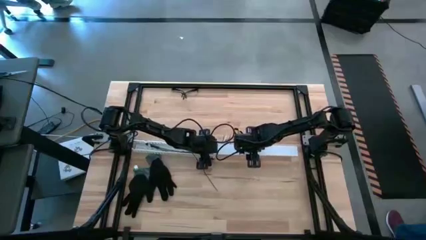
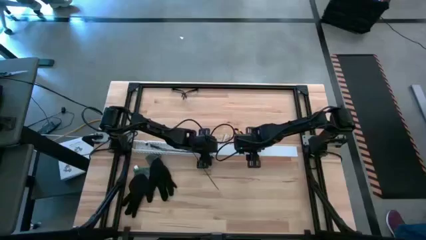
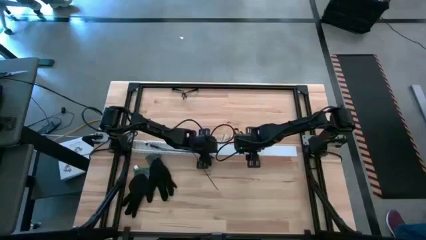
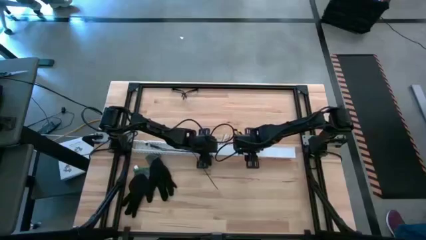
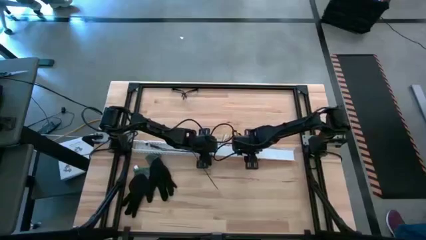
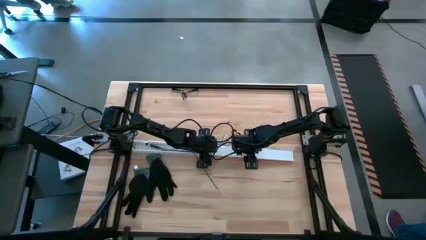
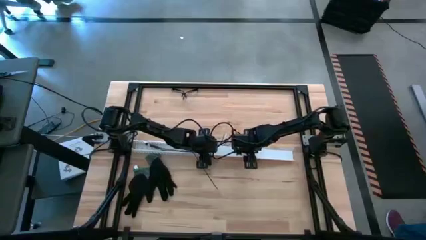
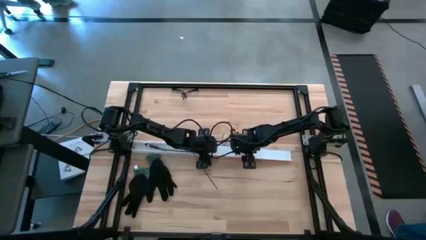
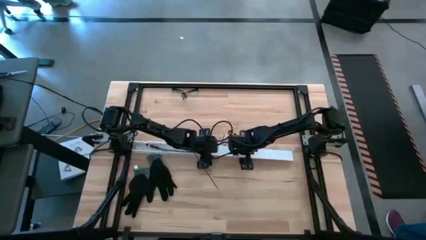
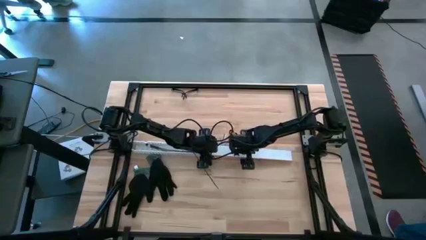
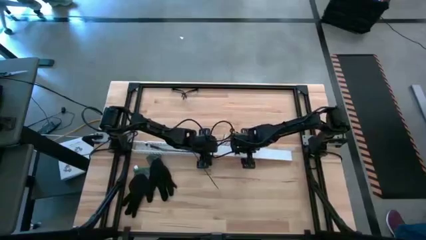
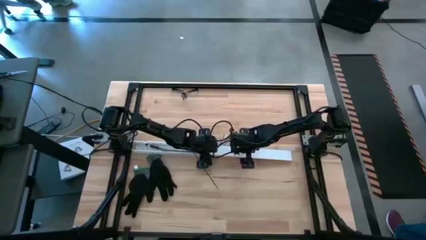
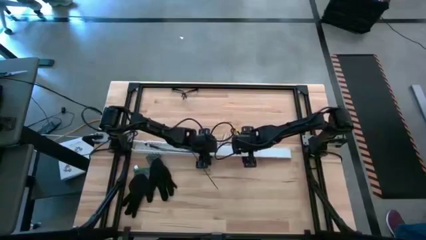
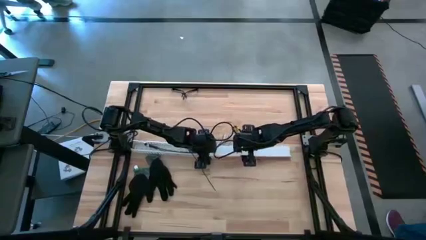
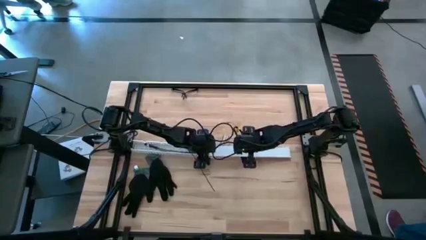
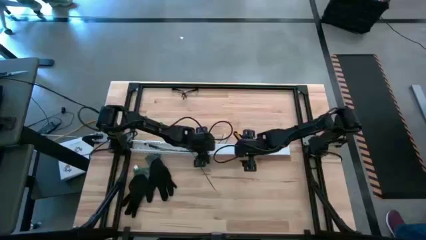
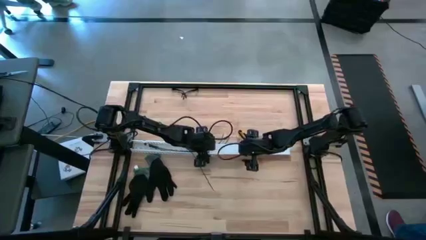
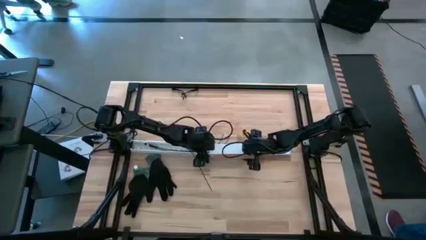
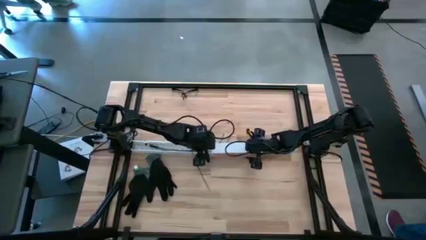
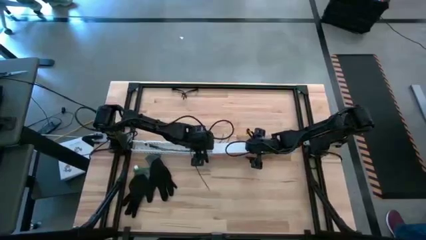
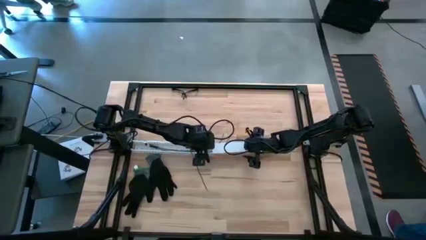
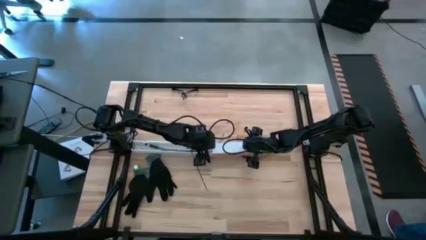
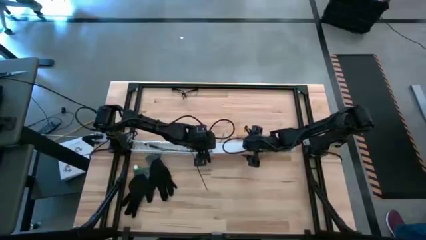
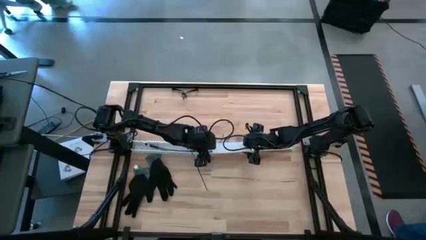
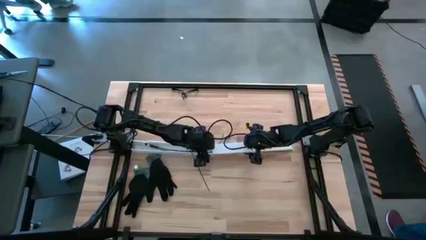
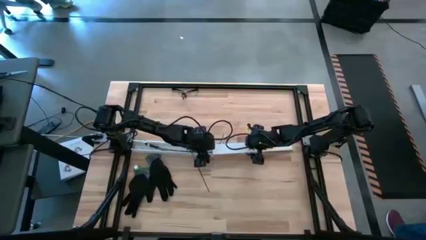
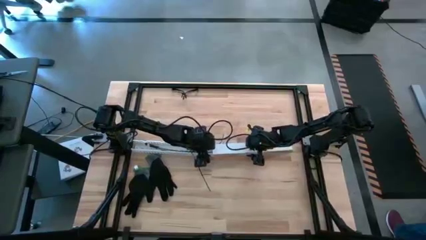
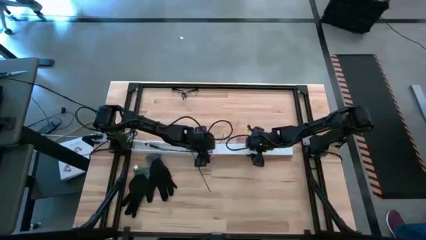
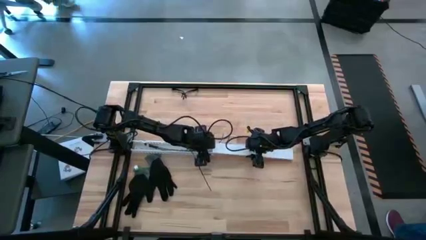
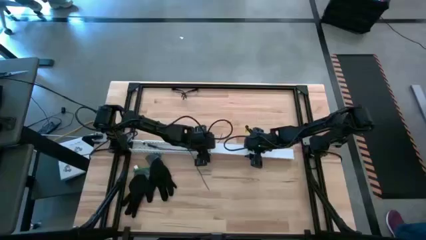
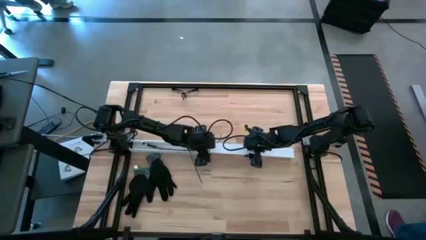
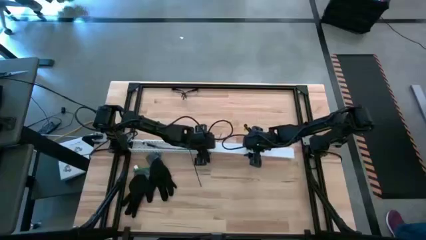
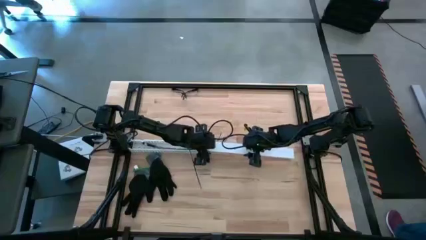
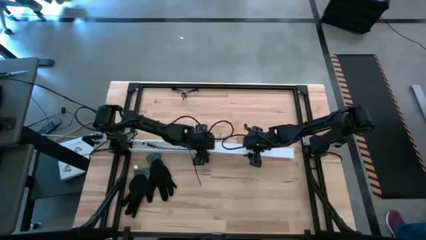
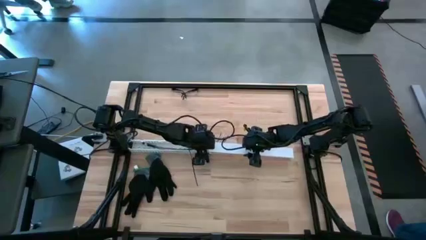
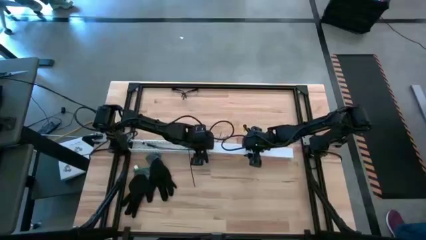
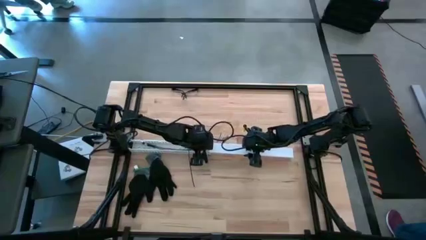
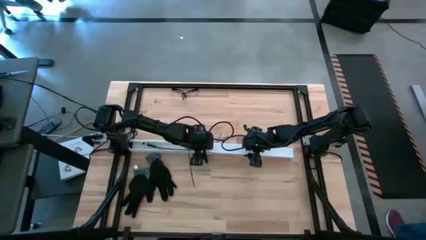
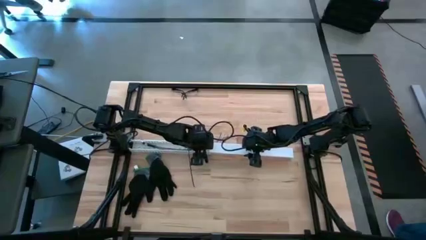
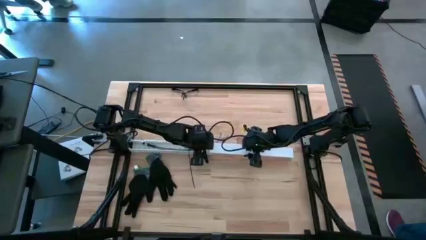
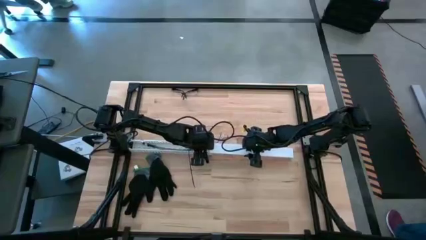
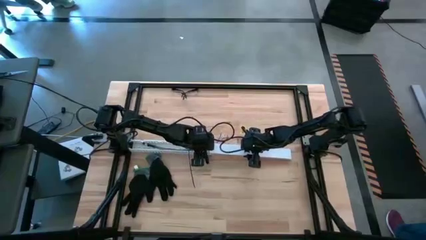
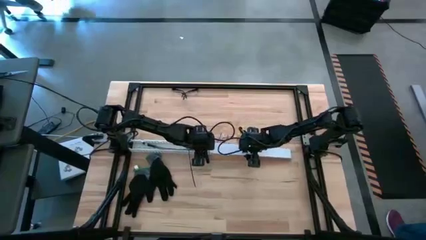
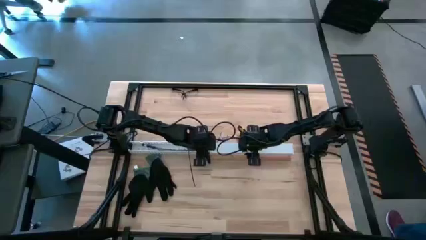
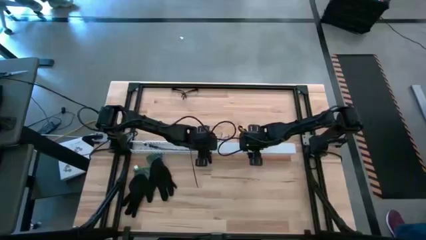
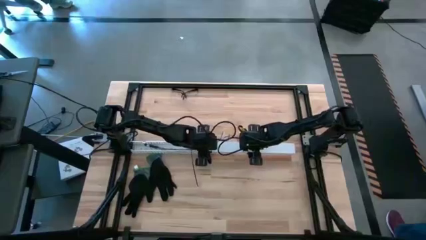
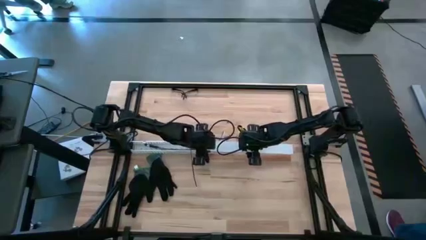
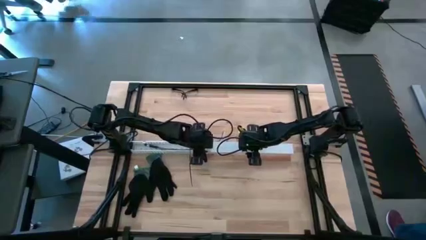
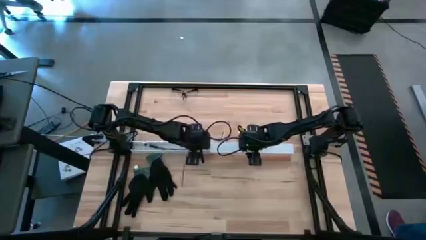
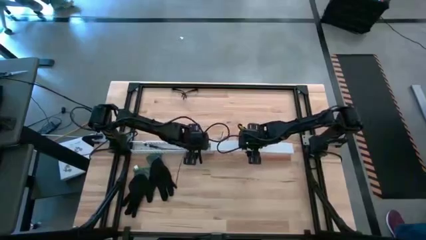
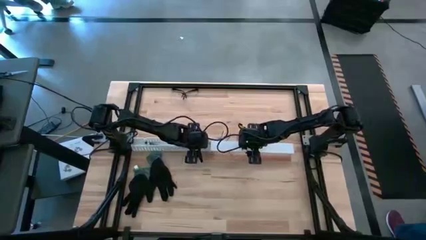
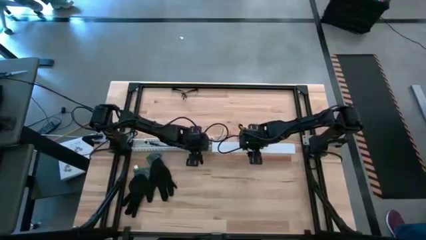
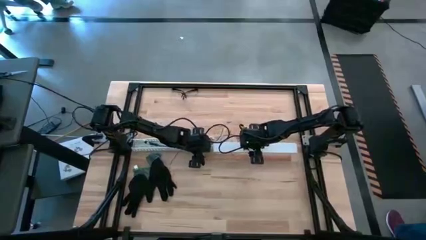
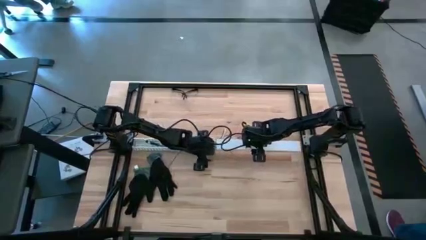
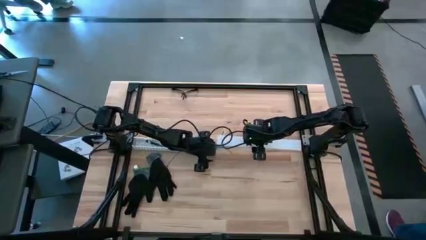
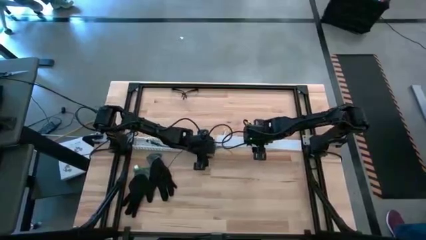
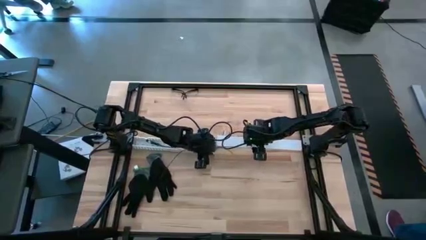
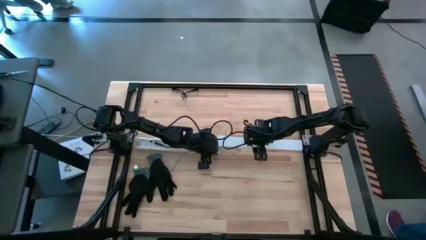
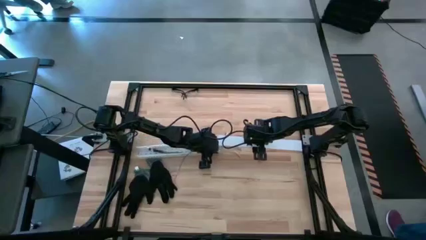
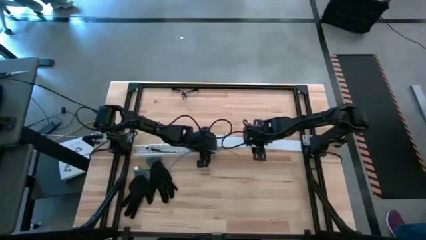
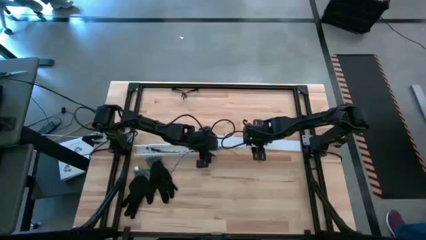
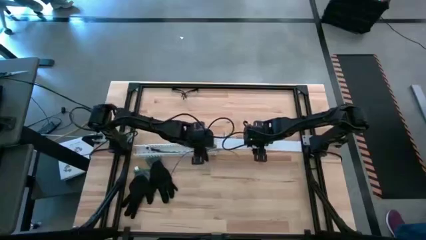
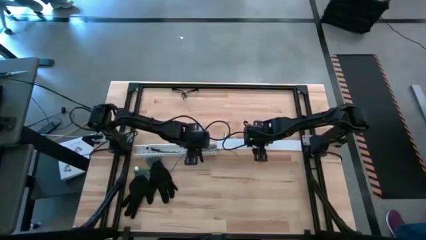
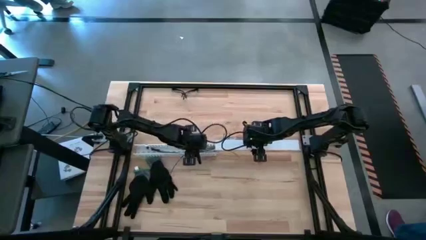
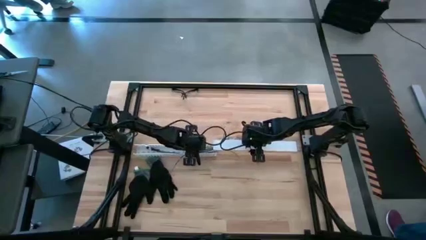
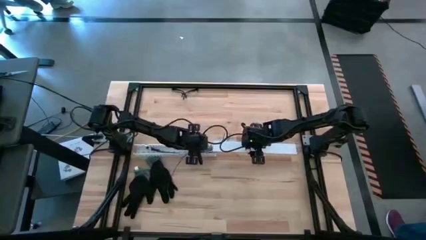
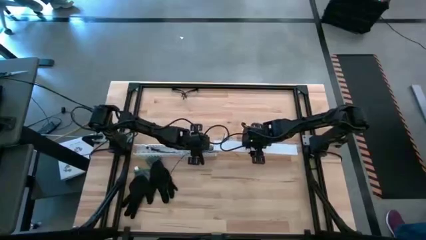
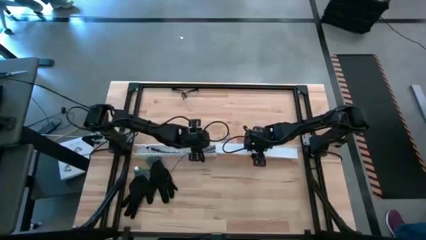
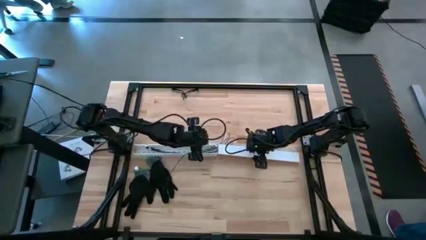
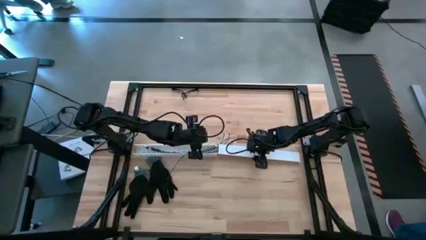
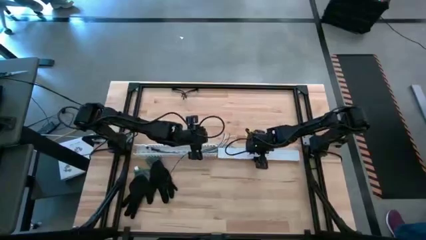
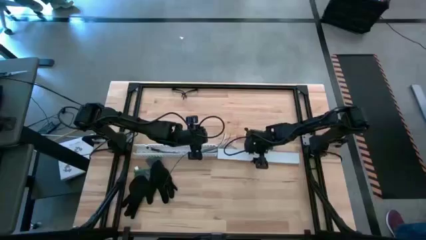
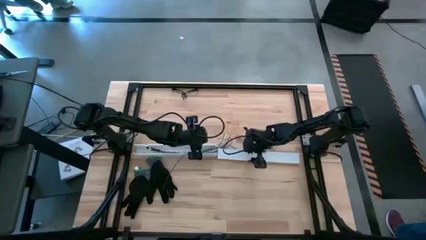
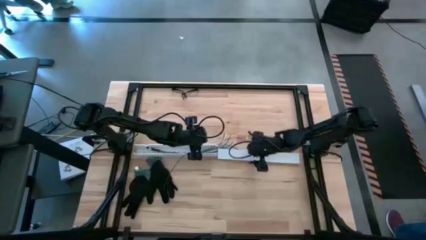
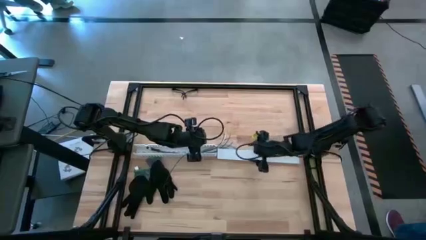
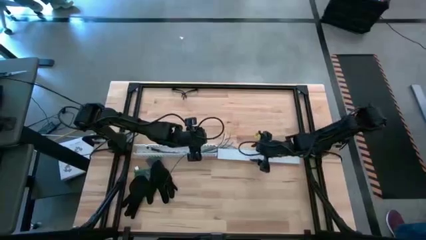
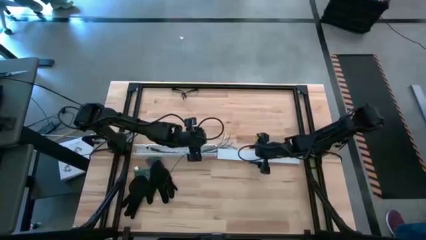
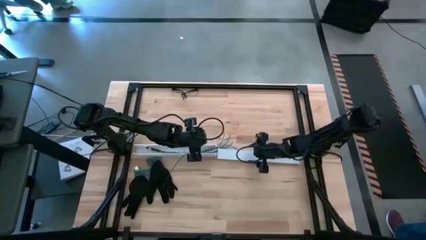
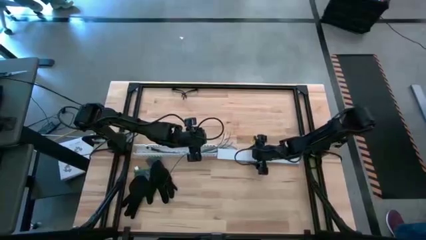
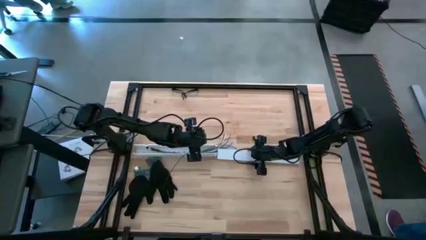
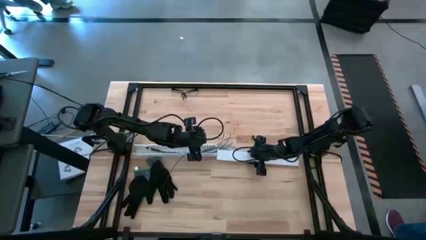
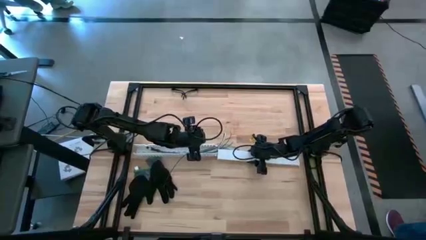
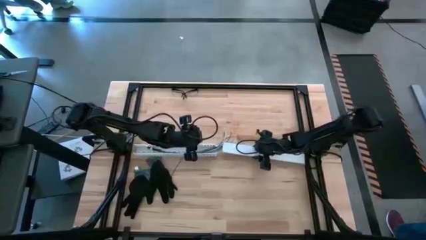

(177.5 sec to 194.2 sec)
Task: Ziptie cables
Close the white cable duct
